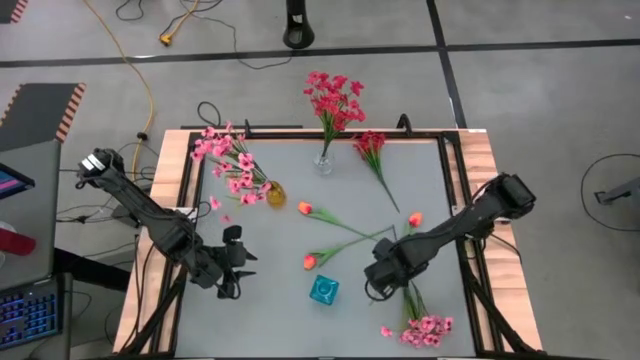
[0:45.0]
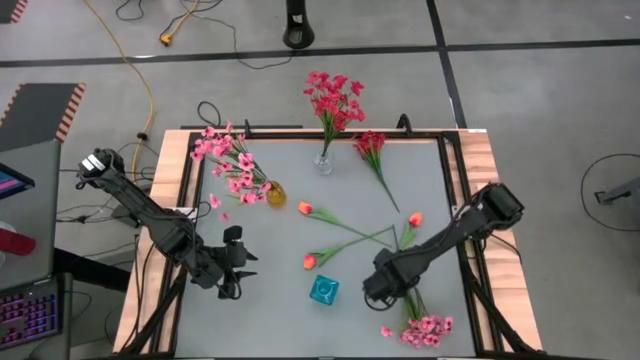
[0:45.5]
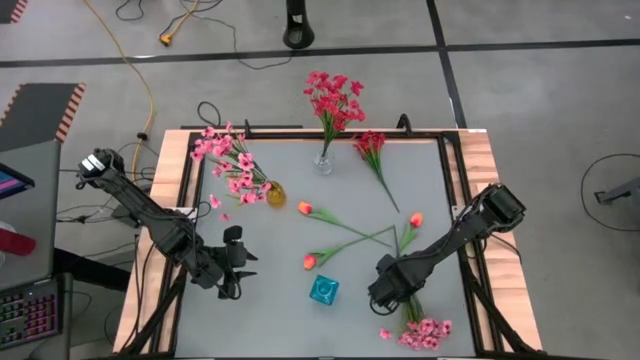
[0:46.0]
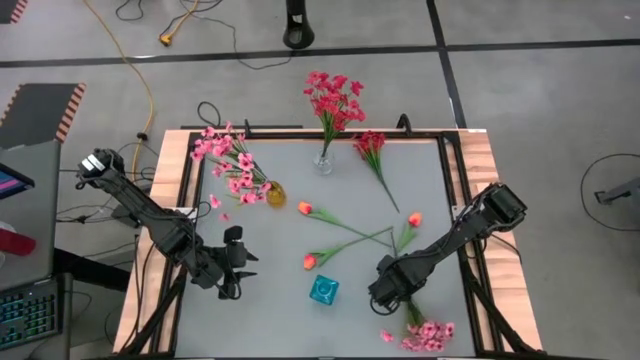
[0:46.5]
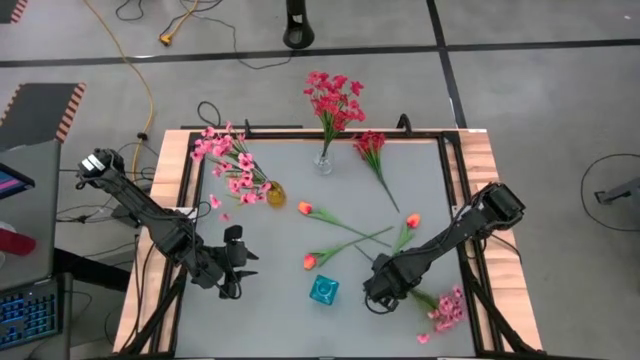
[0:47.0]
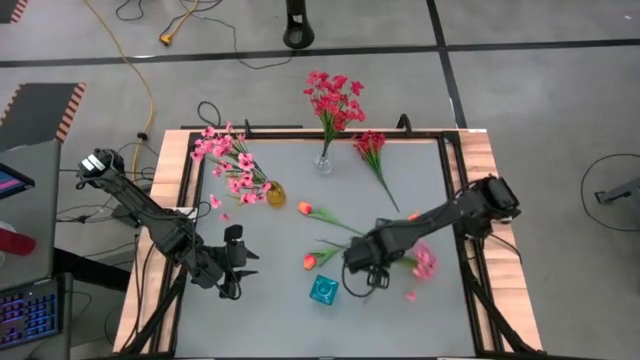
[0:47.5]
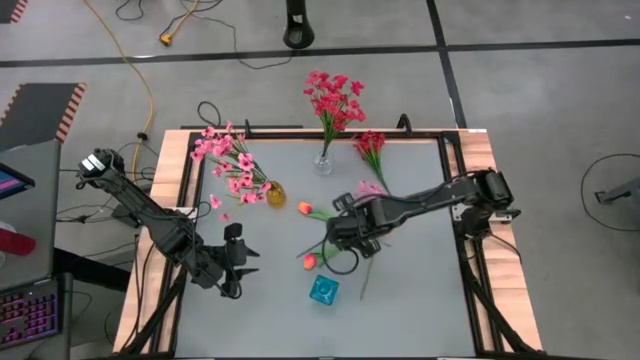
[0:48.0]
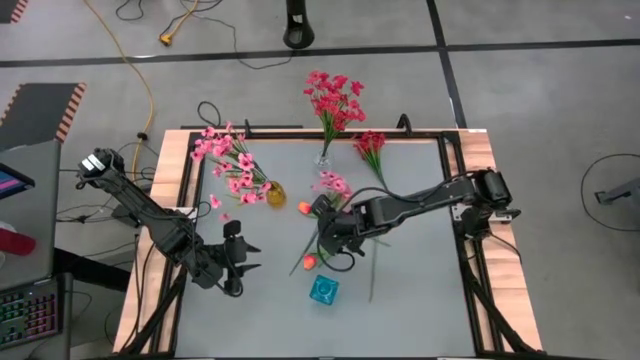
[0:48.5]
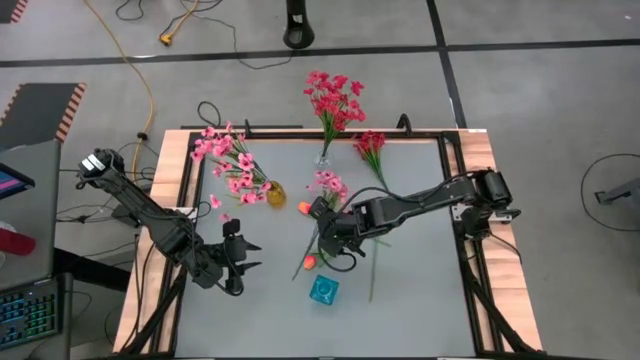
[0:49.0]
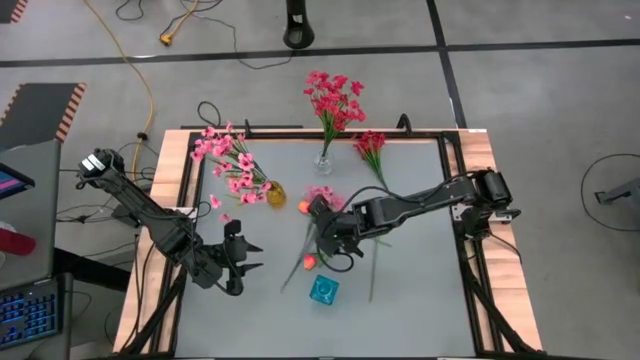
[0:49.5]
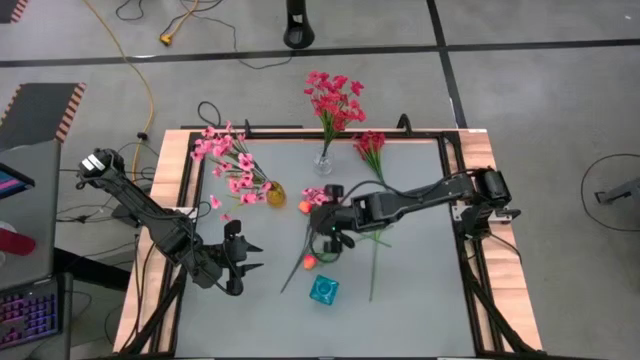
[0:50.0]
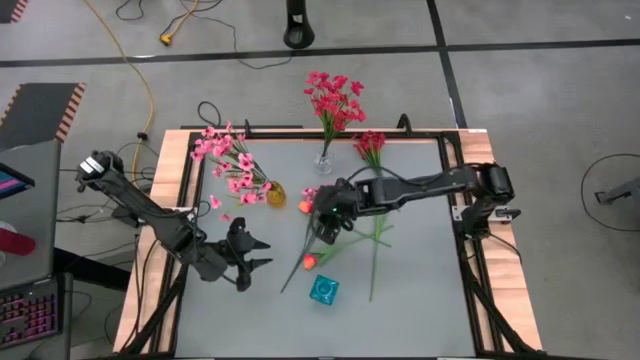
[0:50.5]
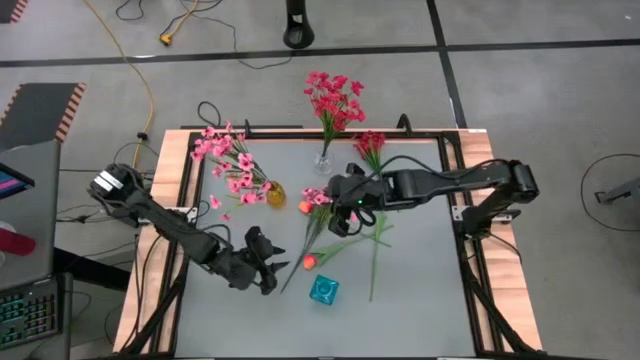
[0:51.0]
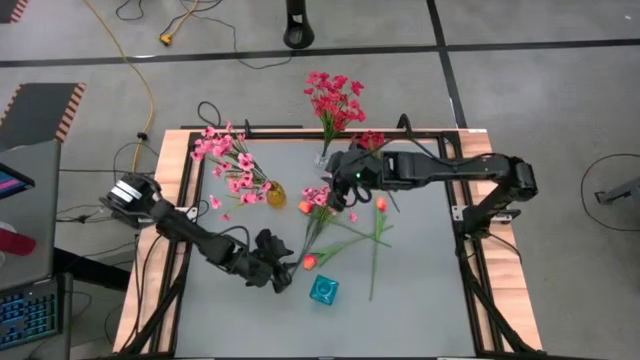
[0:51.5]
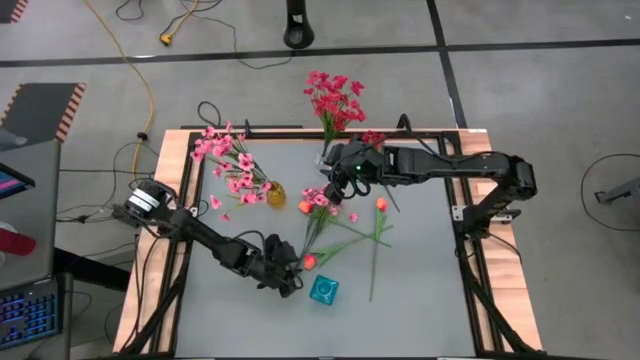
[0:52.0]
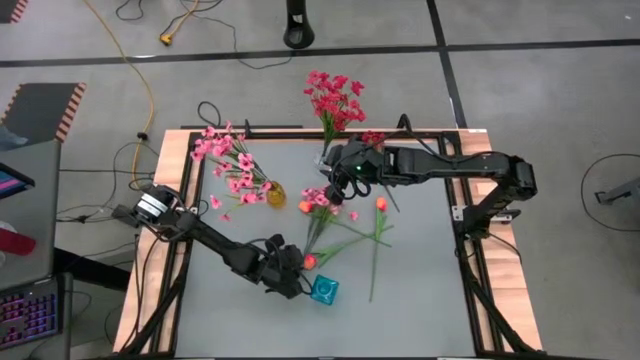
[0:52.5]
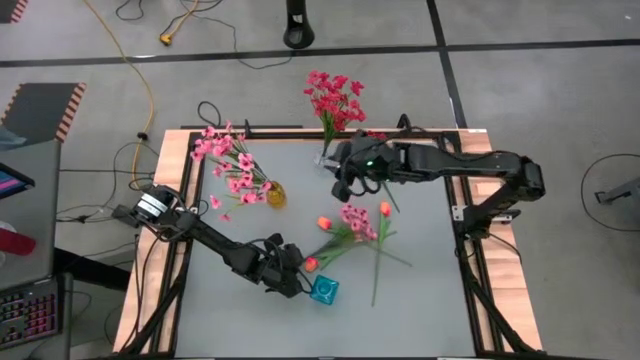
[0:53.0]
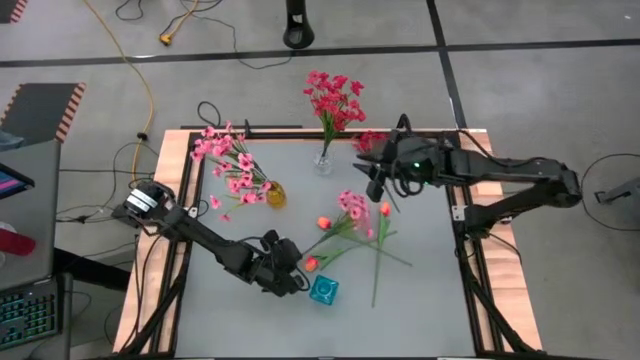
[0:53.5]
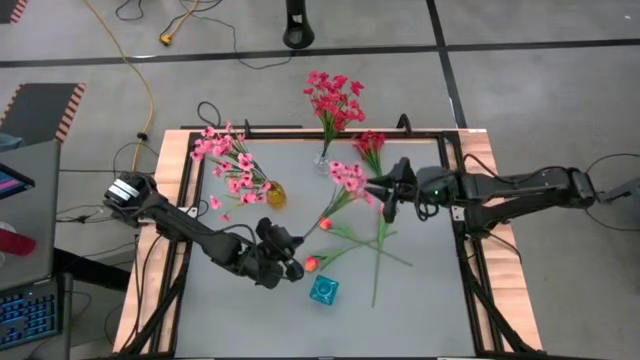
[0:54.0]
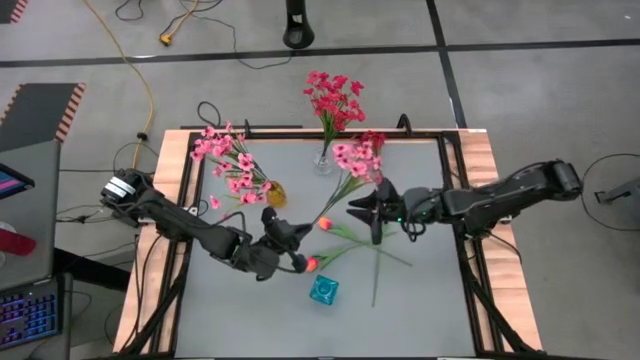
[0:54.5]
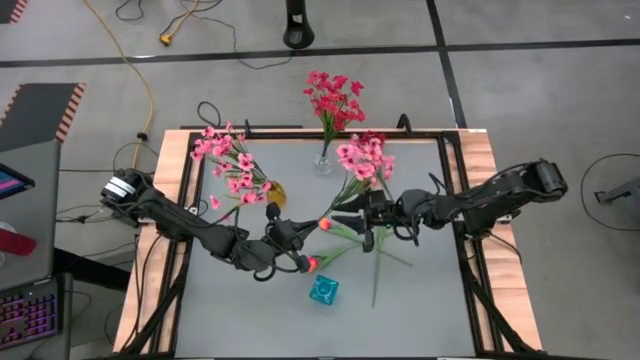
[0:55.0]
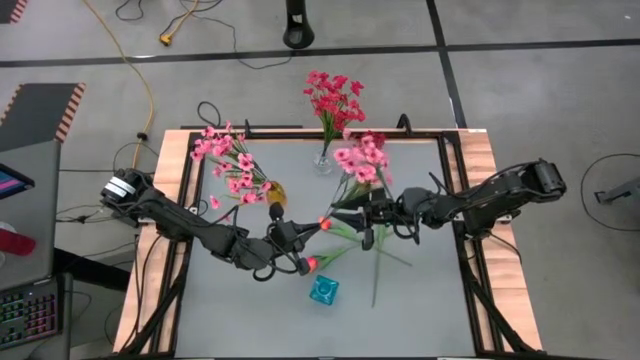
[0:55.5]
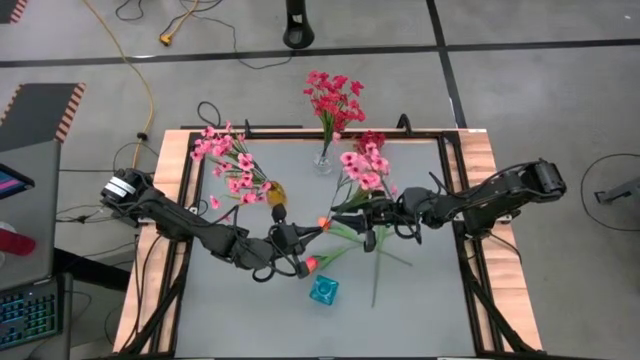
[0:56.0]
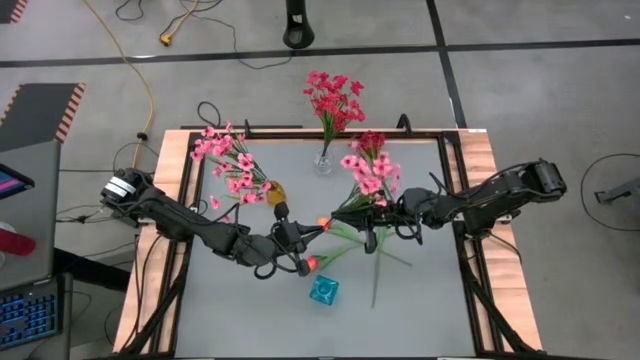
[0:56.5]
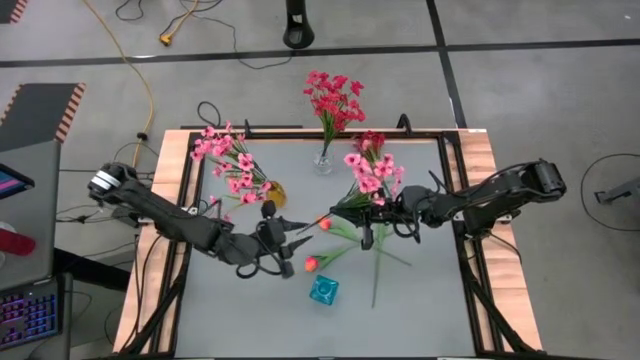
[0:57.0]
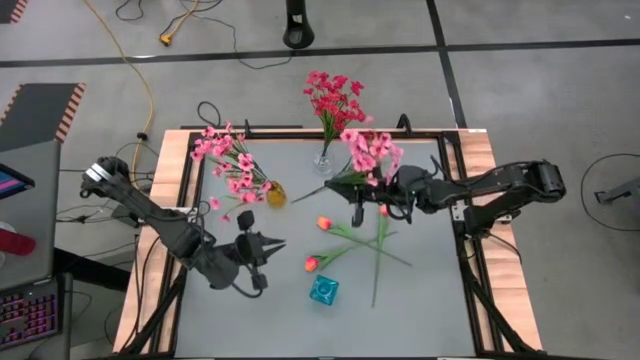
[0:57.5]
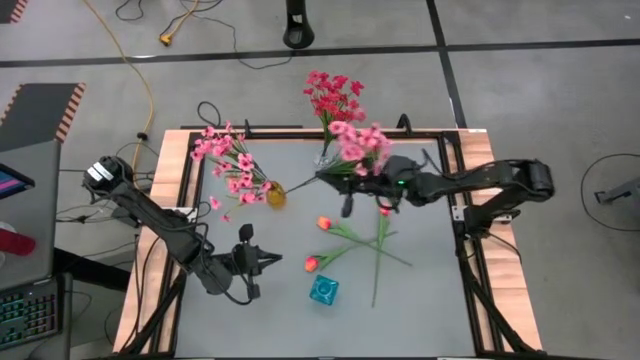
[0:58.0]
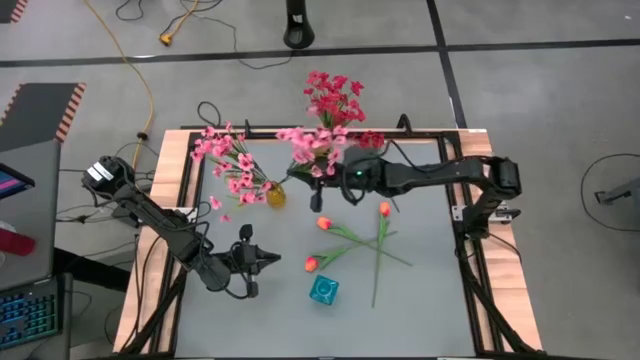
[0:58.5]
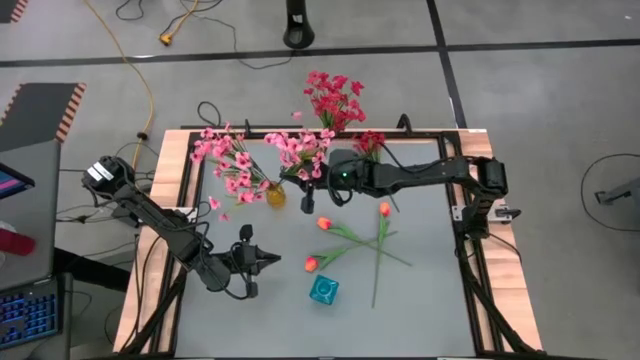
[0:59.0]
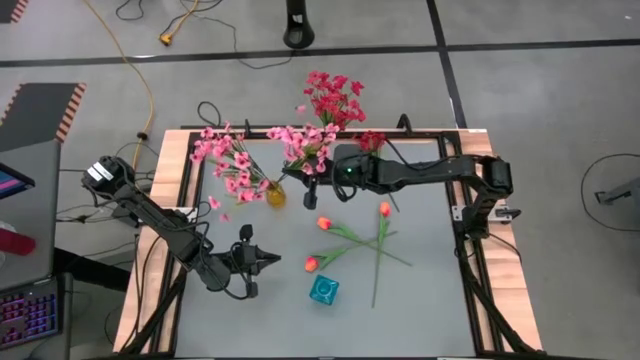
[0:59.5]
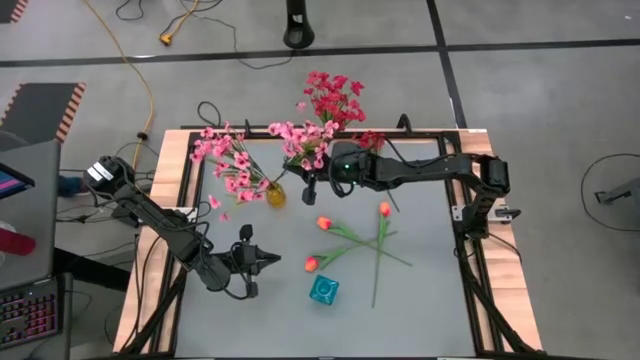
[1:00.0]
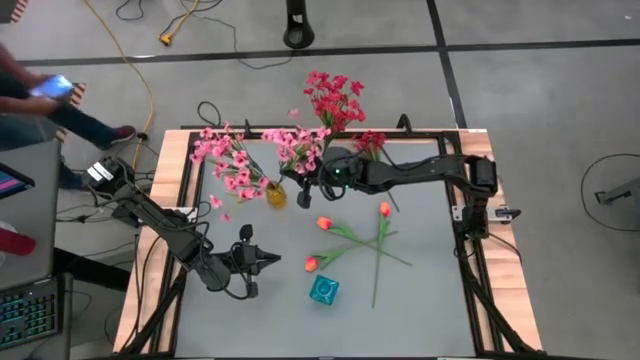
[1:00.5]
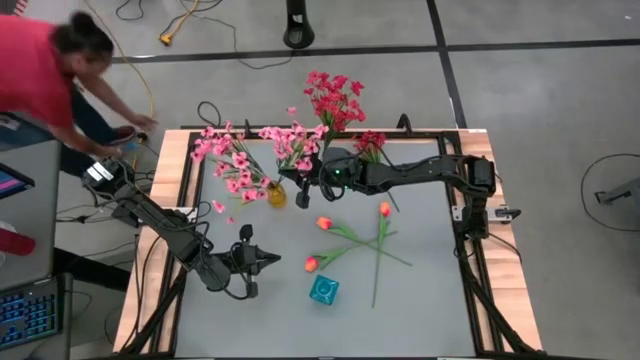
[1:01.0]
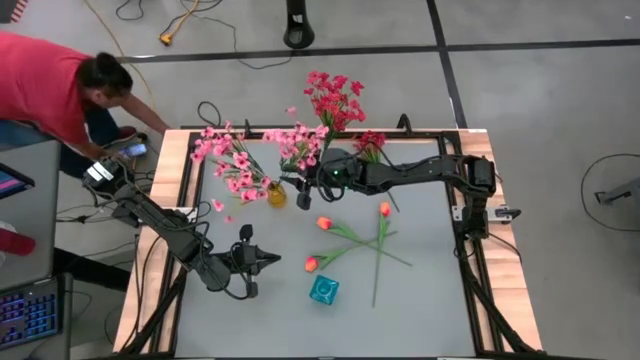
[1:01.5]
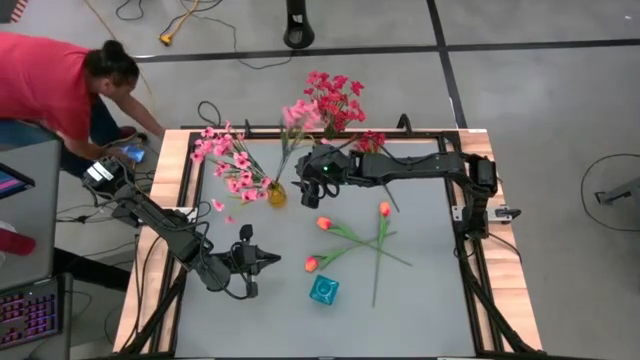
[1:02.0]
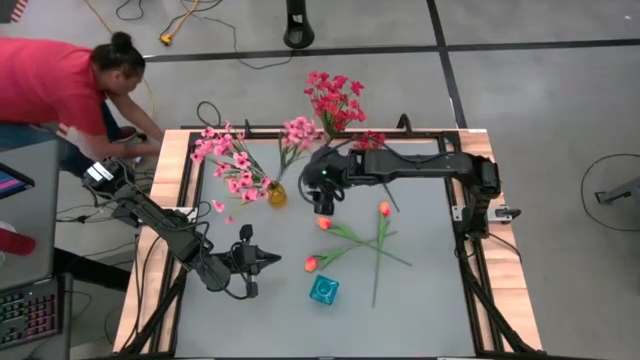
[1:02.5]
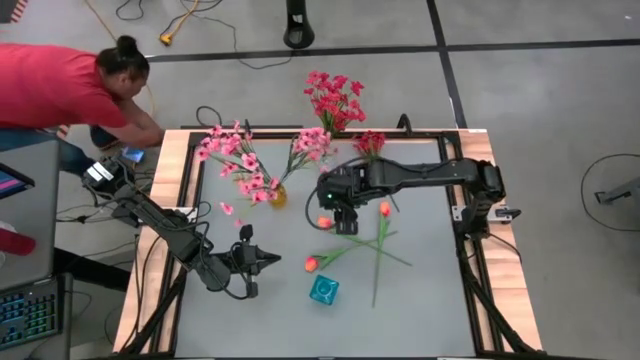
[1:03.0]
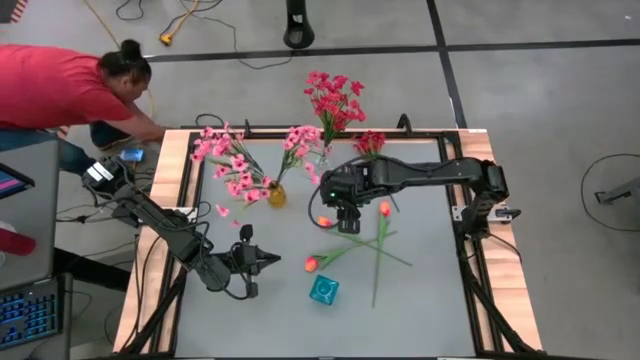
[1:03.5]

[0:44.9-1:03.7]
Task: Sort flowers into vase by color
Put the pink flowers into the yellow vase

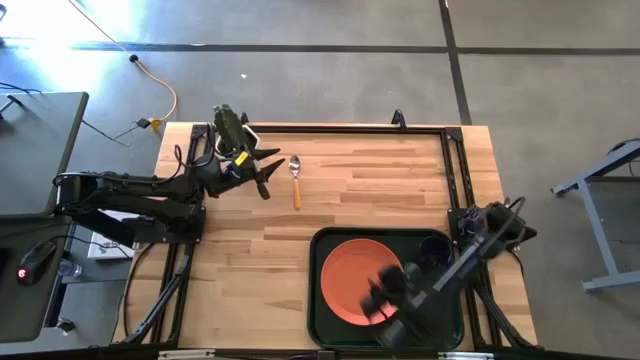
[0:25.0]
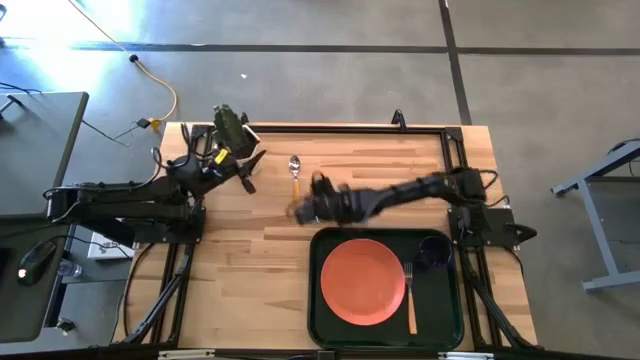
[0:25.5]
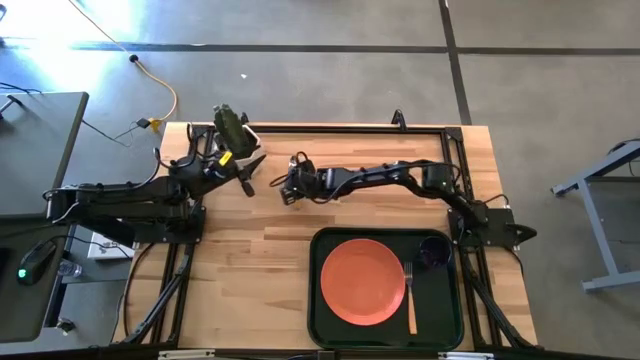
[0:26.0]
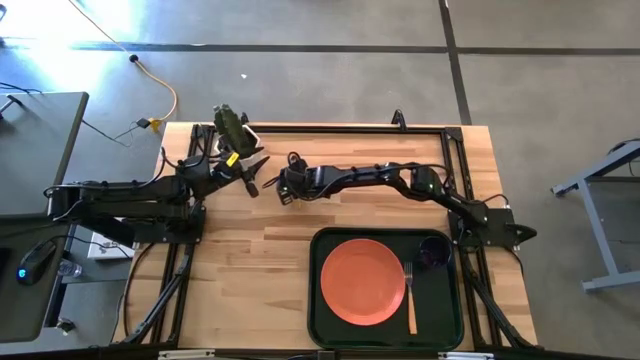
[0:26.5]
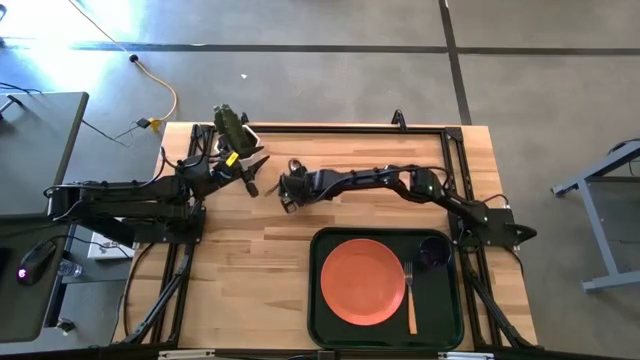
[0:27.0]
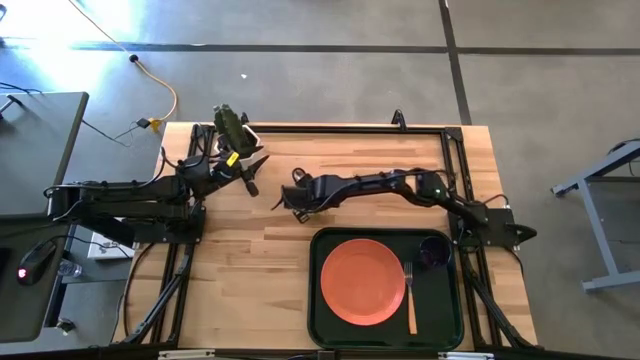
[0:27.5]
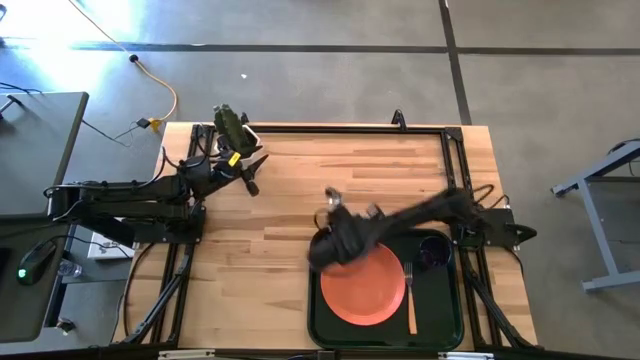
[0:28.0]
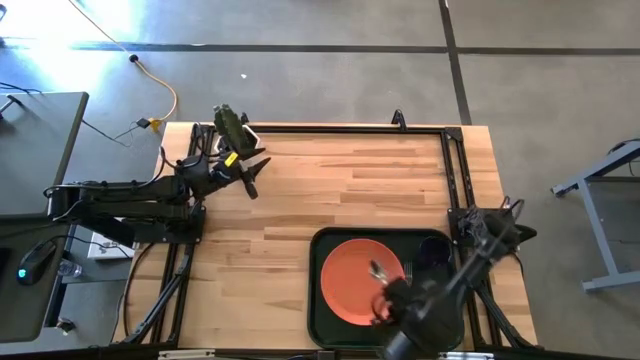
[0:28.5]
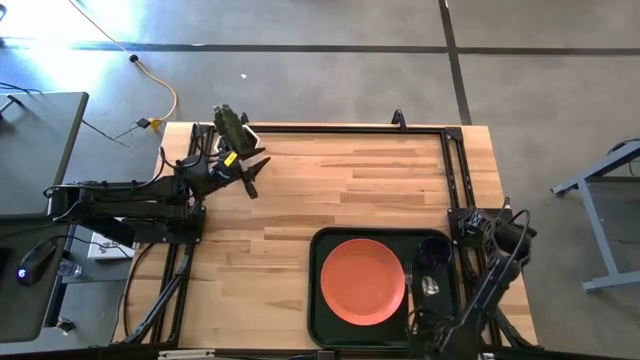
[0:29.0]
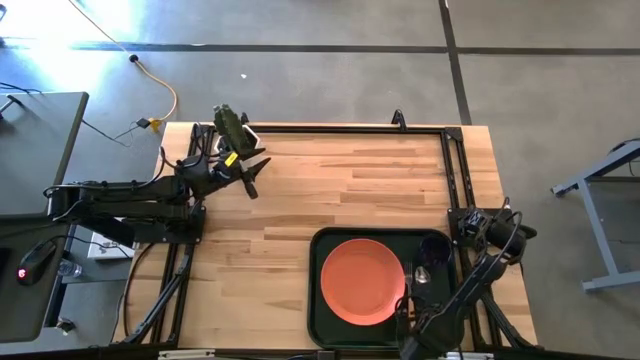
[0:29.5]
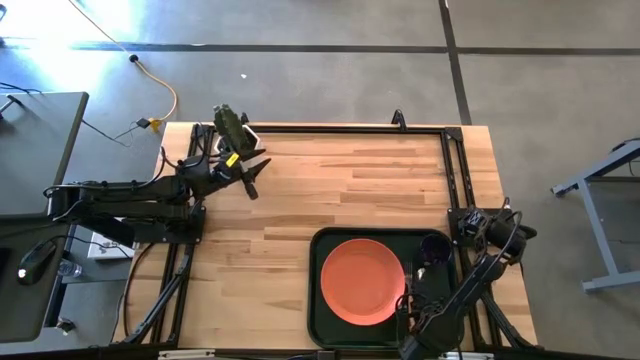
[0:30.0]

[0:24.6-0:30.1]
Task: Pick and place plate/cup/fork/spoon on tray
Put the yellow spoon on the black serving tray to the right yellow fork
